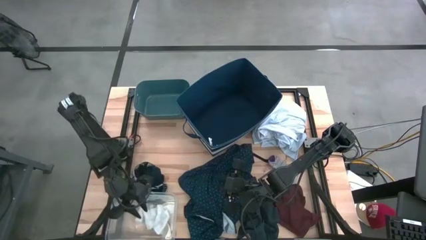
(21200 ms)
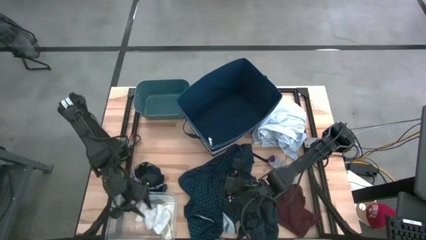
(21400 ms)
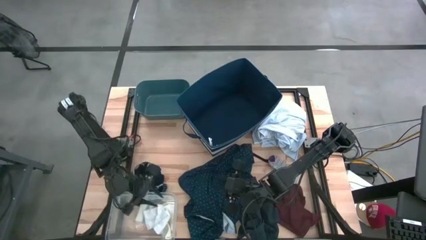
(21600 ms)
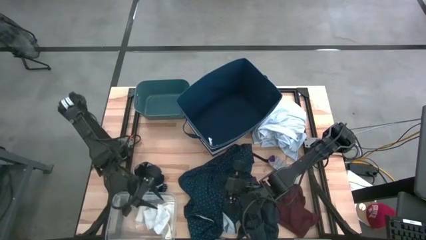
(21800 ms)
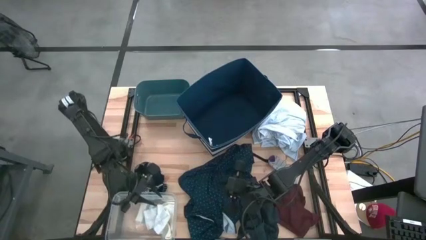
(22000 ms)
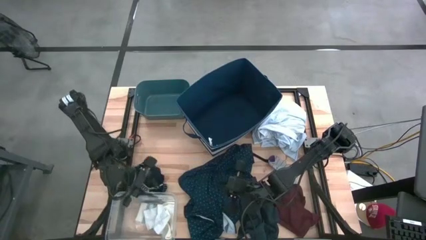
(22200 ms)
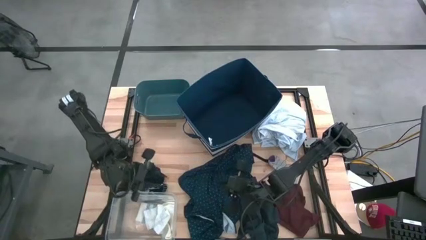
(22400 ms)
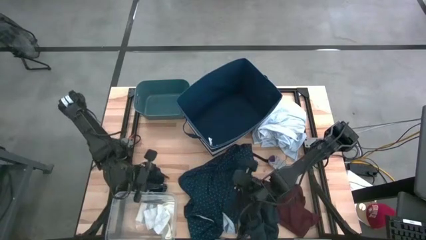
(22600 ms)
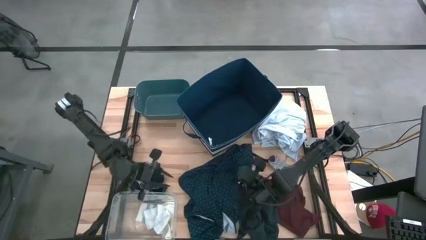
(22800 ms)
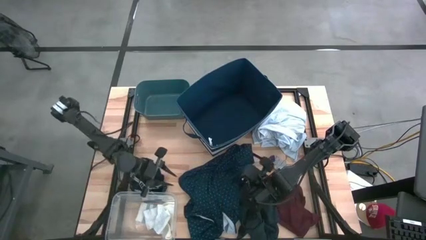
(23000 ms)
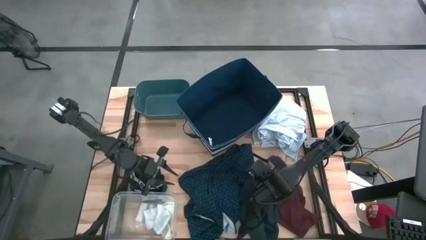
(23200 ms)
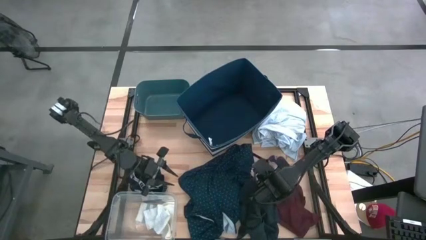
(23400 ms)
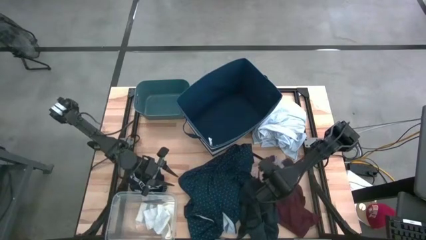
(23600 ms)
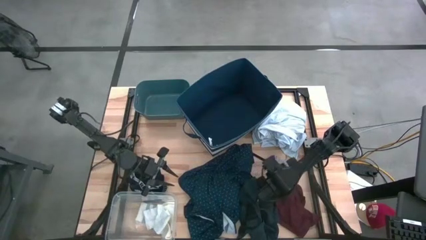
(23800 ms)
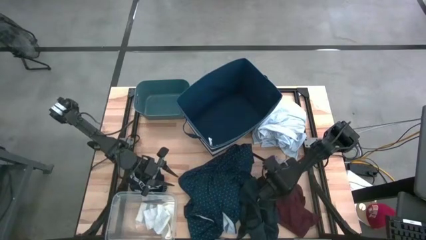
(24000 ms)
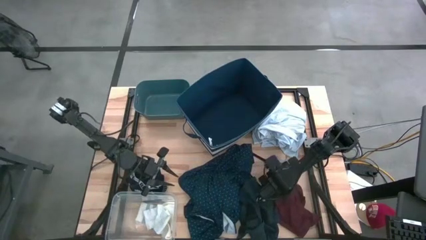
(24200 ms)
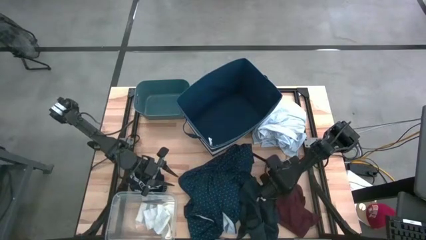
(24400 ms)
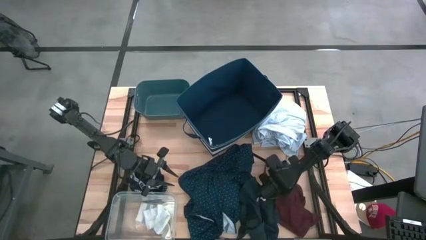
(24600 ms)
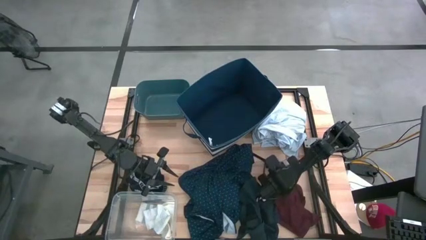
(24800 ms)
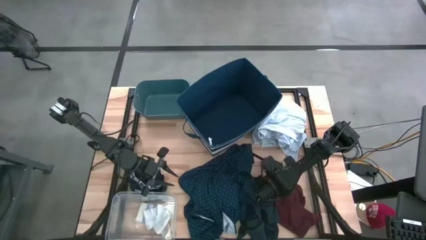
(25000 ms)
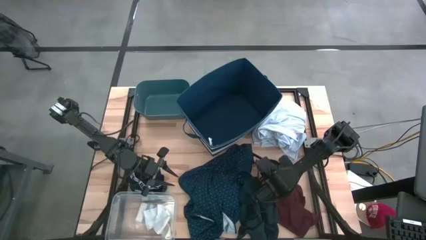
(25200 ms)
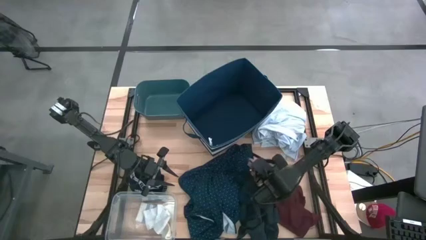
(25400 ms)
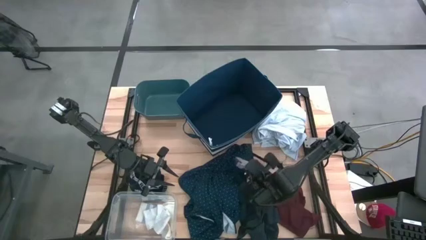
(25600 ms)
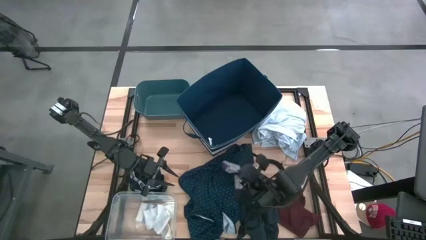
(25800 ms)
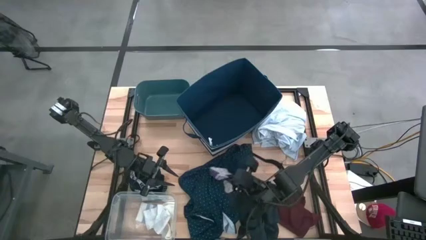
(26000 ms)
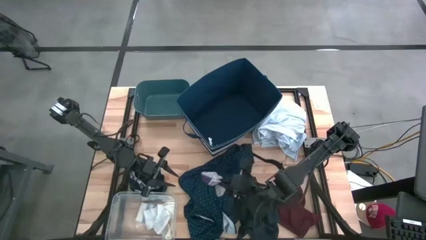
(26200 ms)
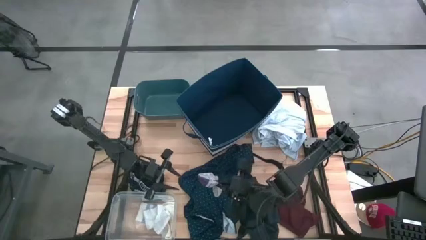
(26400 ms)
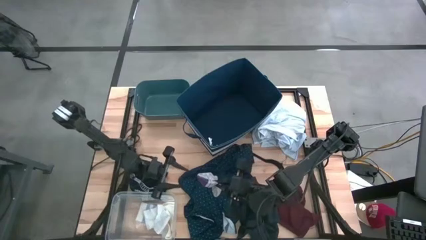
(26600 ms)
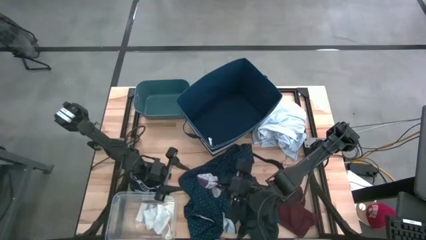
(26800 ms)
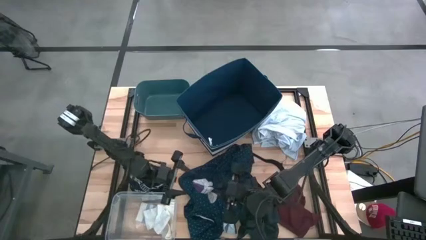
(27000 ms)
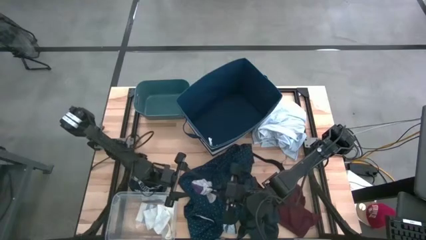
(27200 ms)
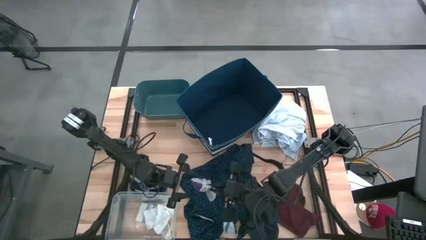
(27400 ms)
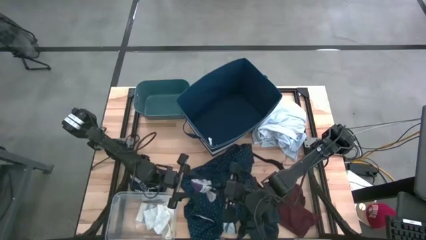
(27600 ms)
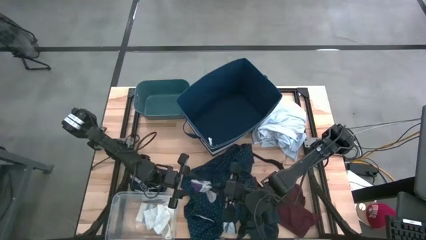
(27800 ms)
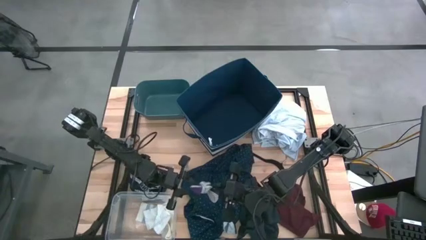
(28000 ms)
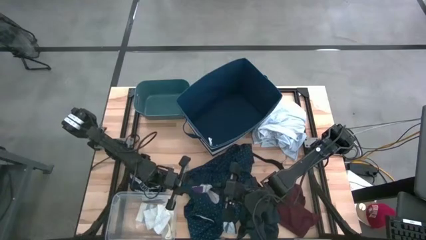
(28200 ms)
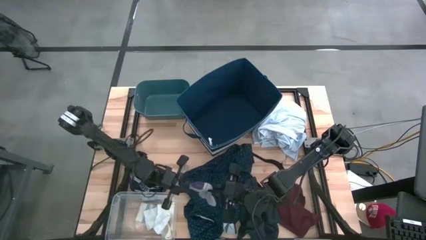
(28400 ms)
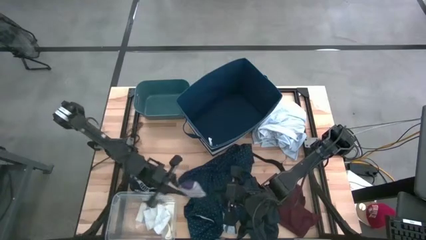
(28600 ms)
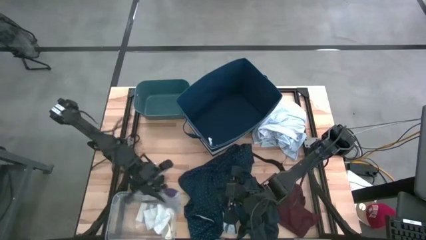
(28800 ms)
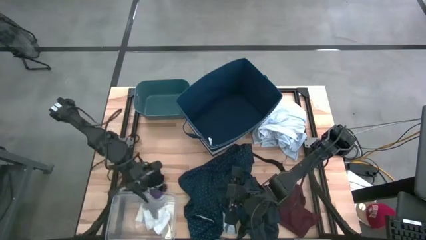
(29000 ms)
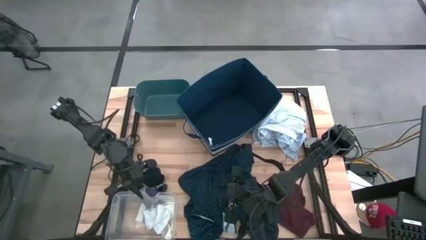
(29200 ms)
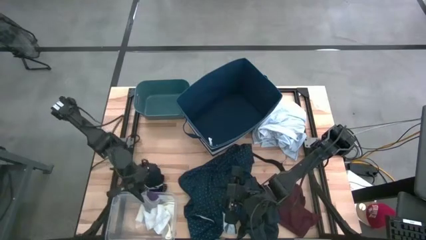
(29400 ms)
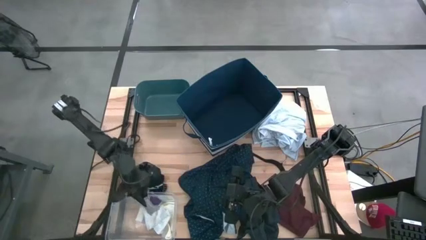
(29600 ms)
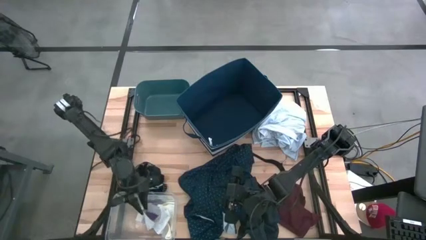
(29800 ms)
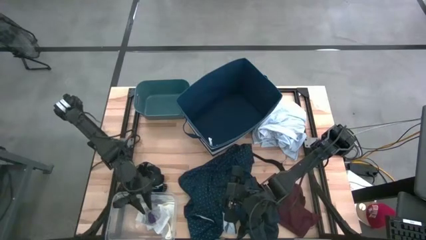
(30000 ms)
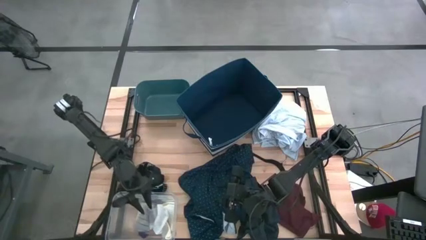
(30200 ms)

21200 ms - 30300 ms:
Task: Pick & Place Cloths
Put the purple white striped sock into the transparent bin

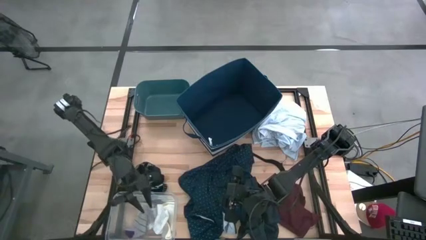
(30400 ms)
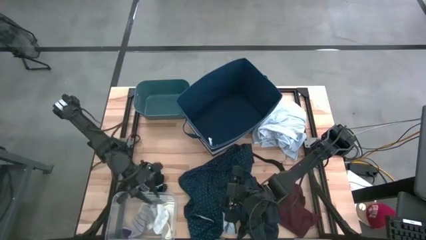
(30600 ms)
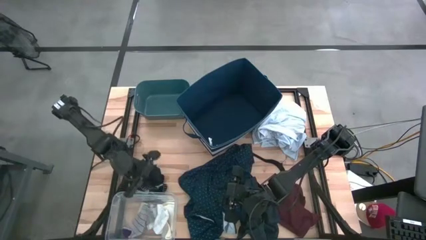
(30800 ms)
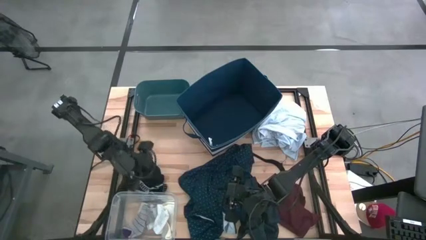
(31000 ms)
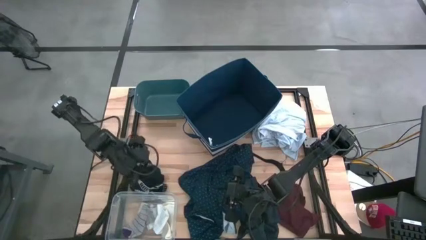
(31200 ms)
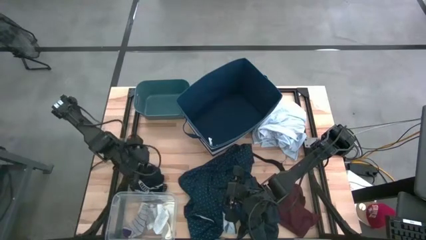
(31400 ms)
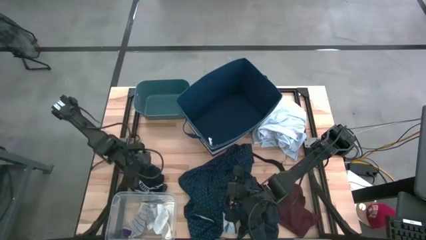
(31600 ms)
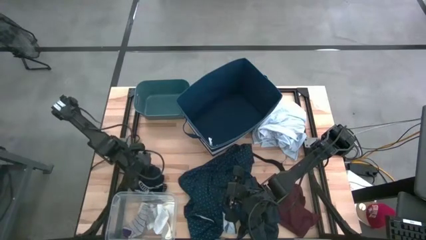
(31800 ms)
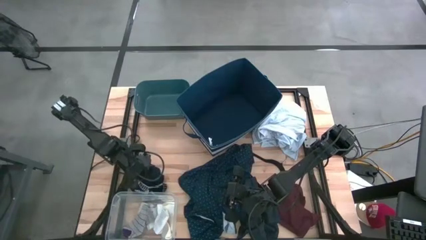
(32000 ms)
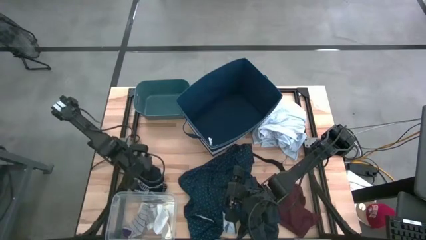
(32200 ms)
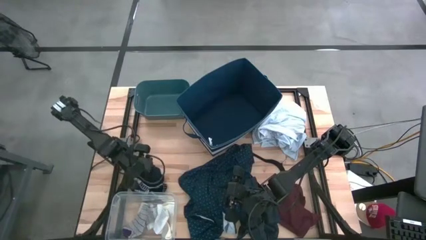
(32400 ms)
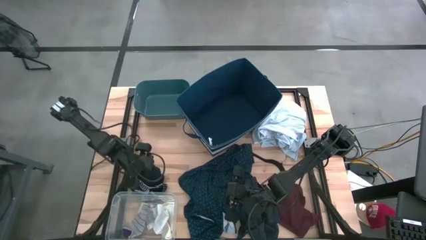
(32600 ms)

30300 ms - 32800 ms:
Put the dark blue underwear into the green bin

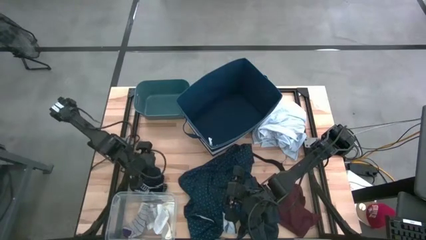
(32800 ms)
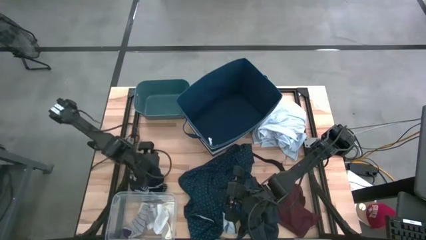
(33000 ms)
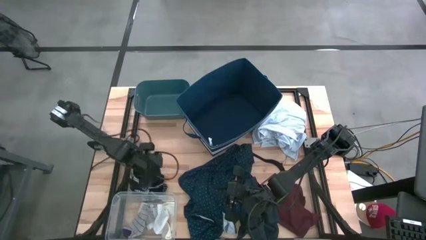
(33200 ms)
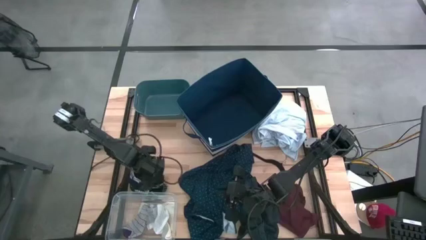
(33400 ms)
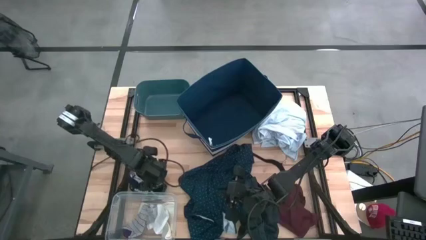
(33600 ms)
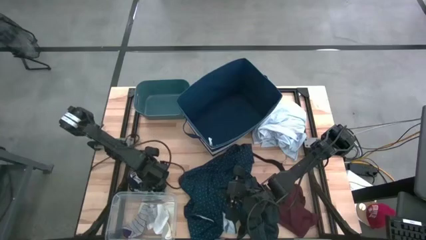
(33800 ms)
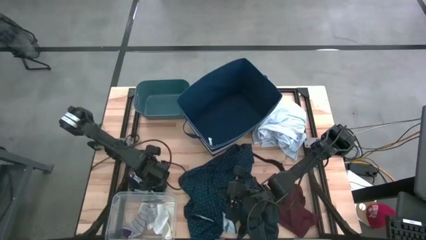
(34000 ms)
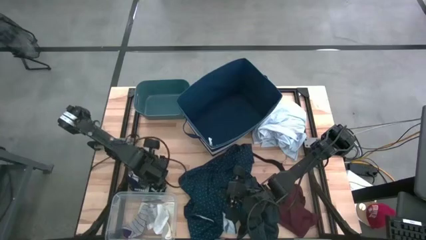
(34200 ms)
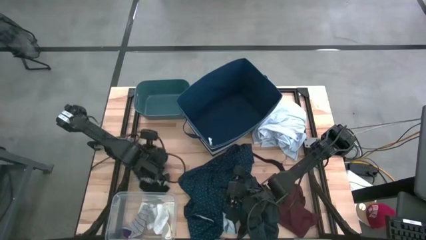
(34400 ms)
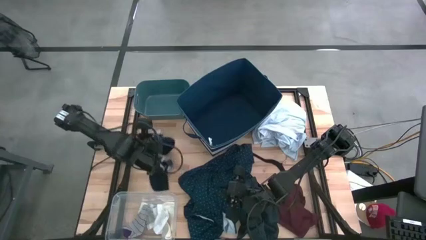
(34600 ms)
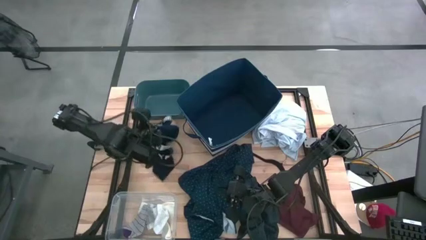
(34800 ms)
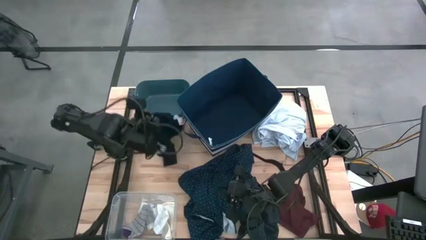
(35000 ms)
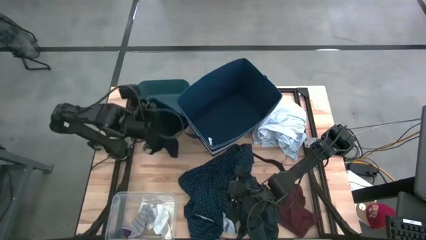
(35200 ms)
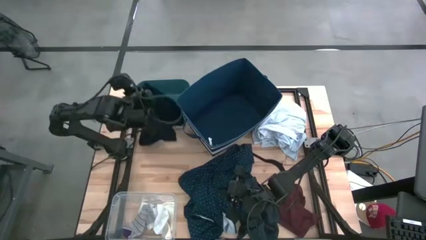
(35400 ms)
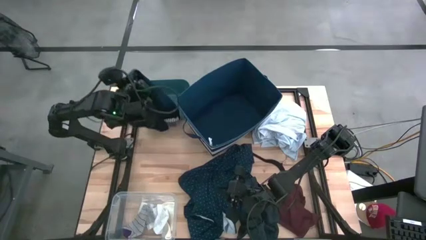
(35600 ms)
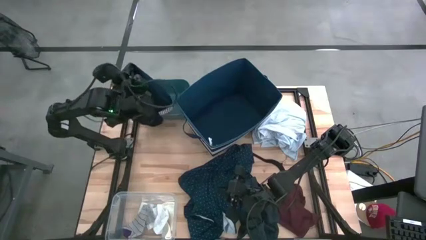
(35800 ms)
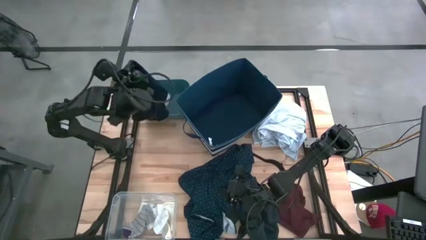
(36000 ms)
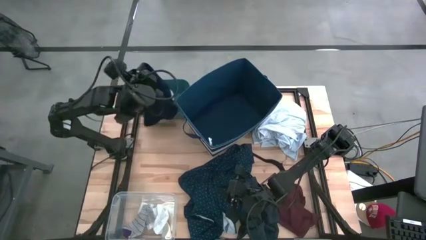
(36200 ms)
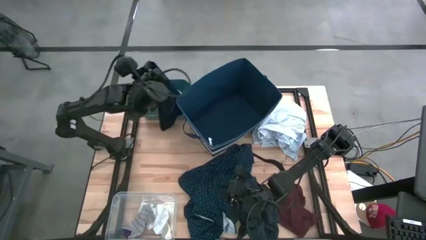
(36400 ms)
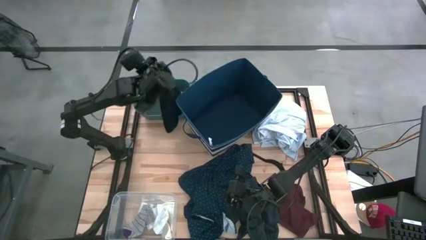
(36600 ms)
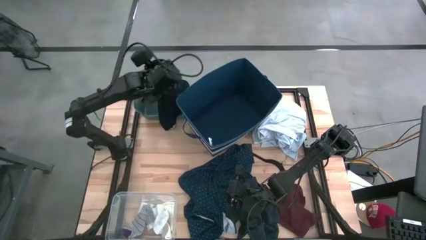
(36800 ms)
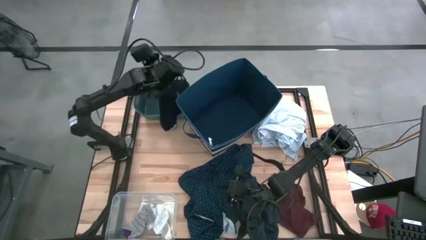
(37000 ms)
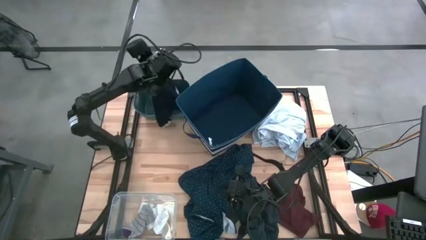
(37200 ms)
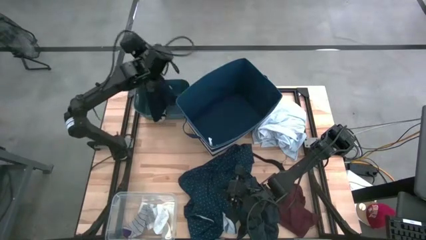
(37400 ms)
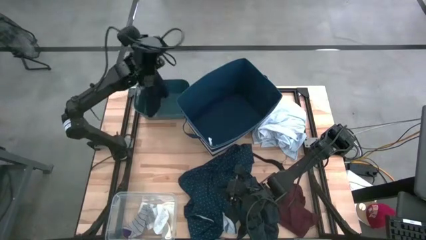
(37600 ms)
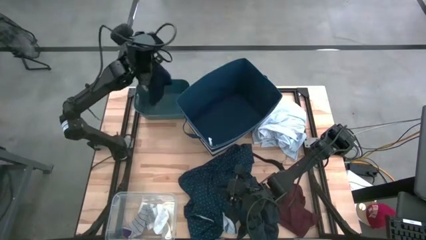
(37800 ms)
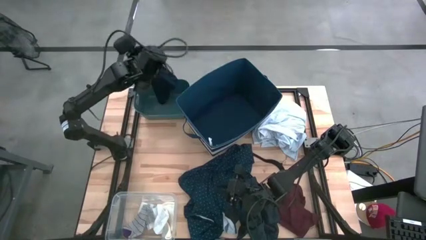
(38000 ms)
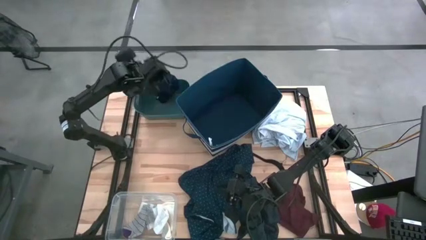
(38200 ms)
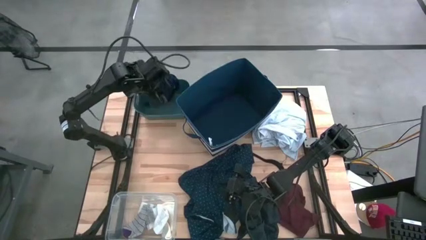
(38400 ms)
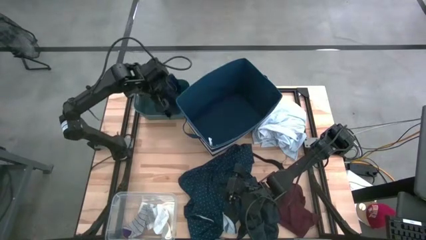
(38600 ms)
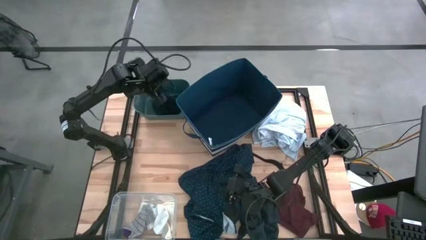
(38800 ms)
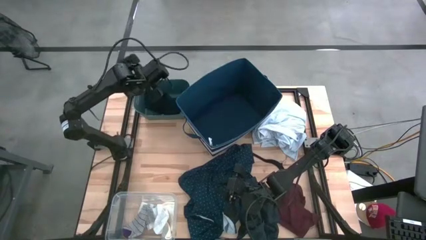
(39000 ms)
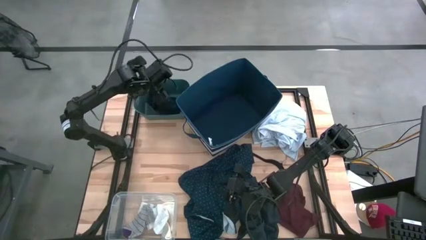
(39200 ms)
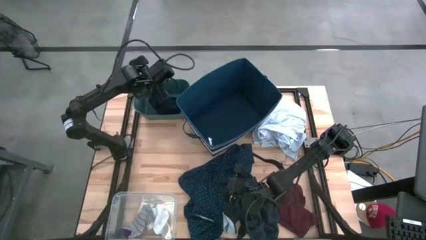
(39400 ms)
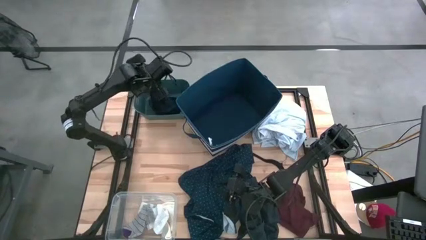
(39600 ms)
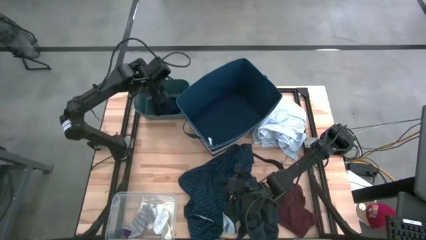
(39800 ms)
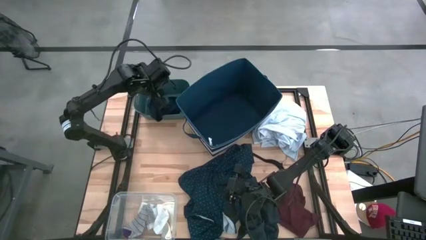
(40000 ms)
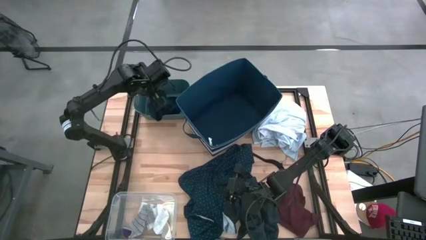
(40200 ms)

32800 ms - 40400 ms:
Put the dark blue underwear into the green bin
